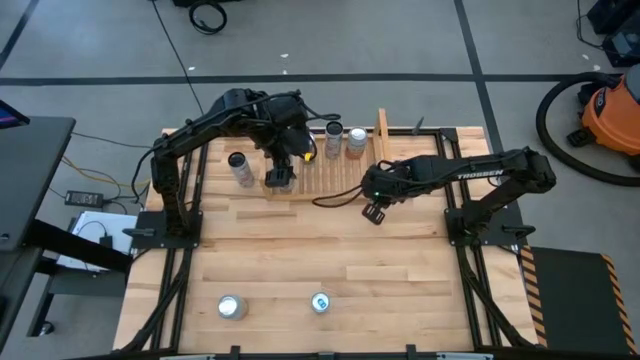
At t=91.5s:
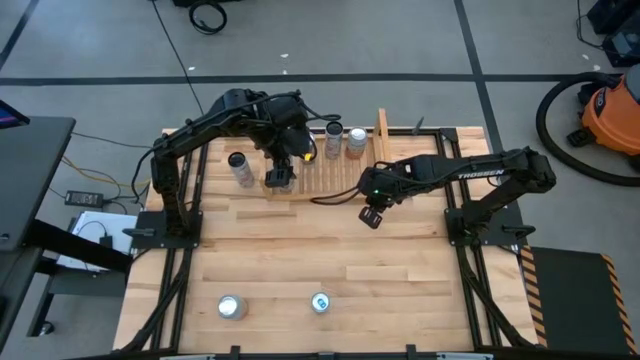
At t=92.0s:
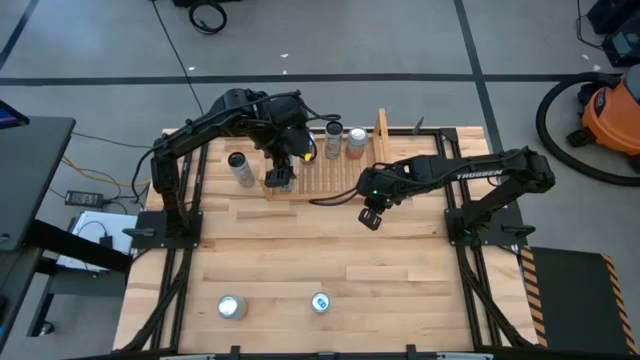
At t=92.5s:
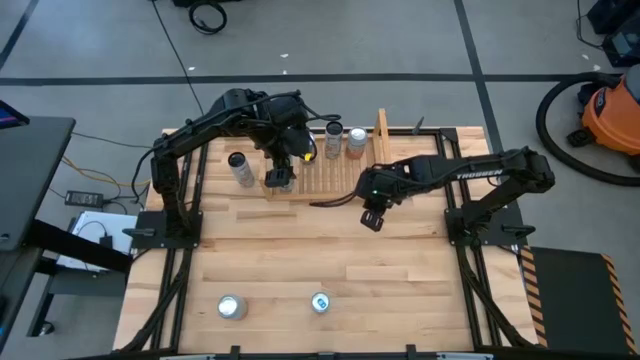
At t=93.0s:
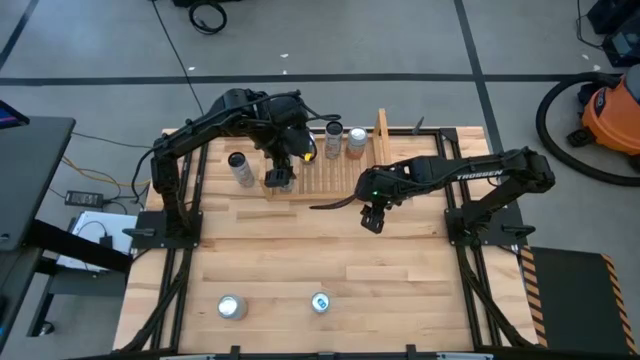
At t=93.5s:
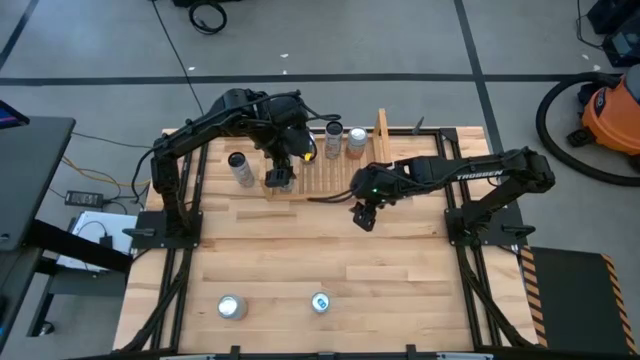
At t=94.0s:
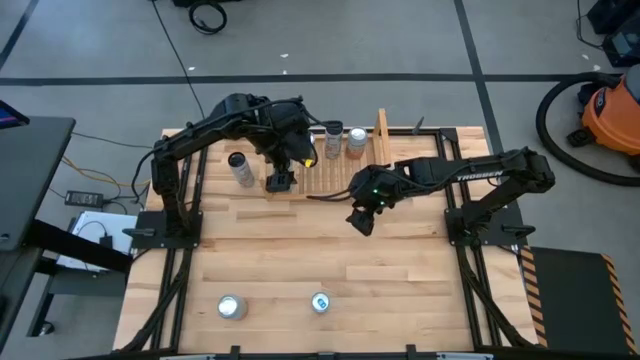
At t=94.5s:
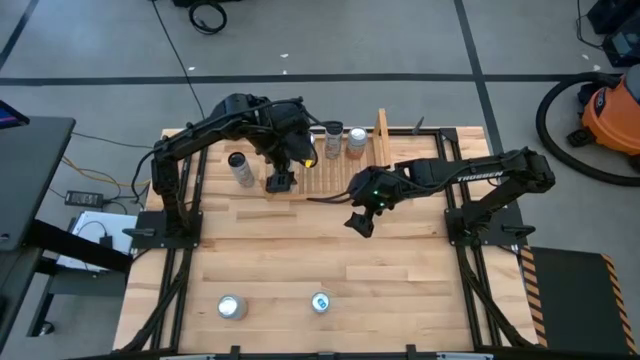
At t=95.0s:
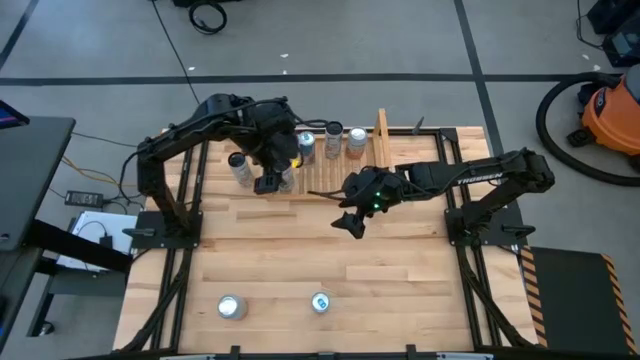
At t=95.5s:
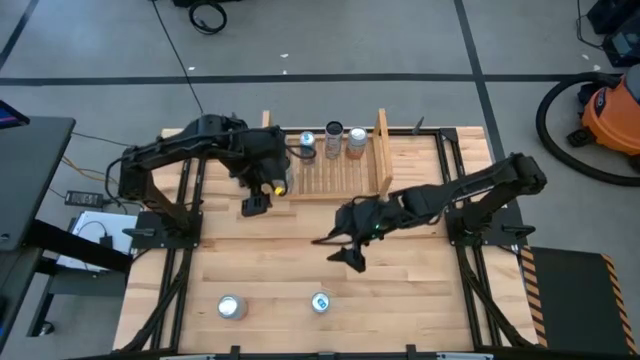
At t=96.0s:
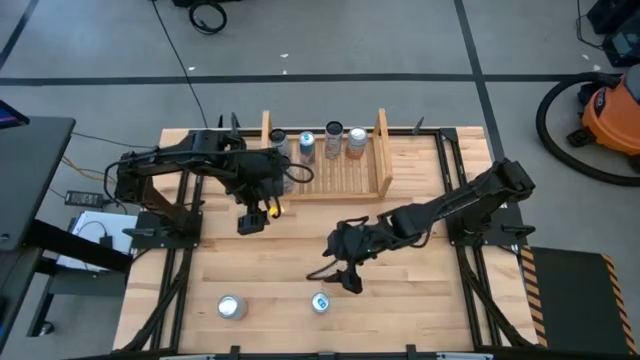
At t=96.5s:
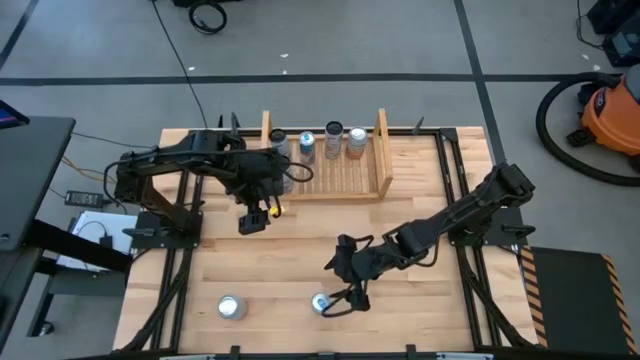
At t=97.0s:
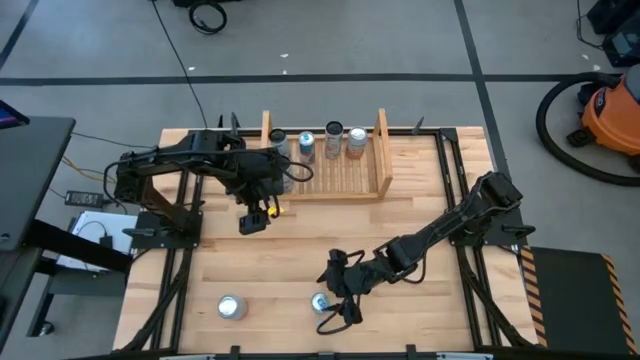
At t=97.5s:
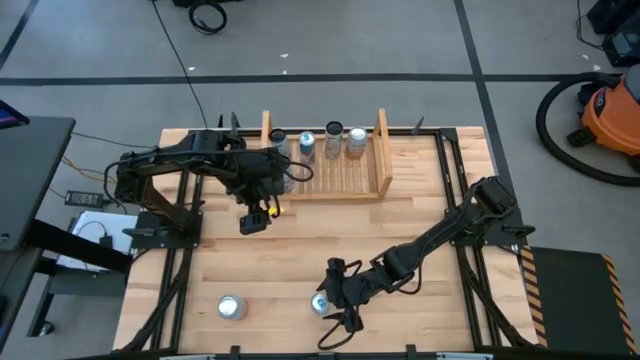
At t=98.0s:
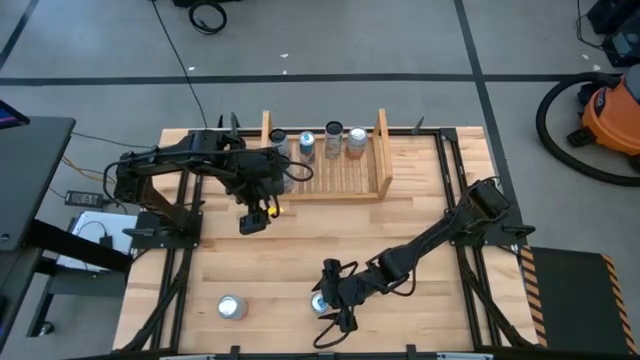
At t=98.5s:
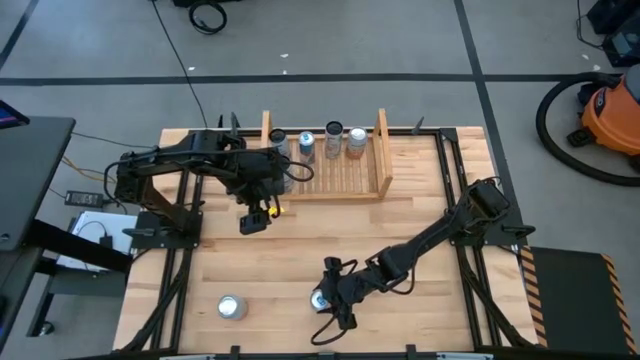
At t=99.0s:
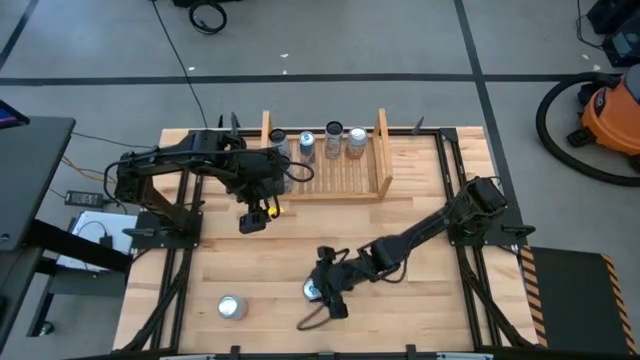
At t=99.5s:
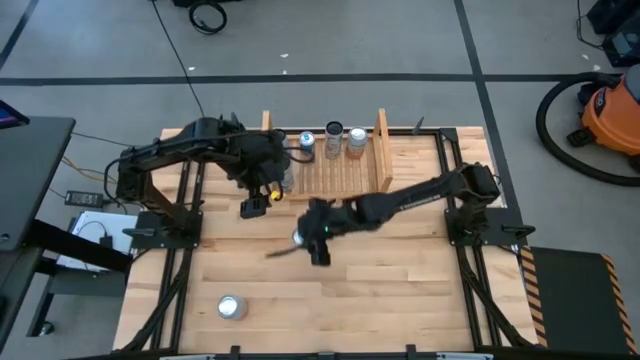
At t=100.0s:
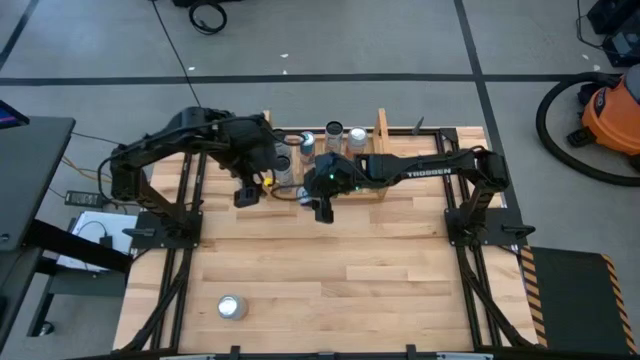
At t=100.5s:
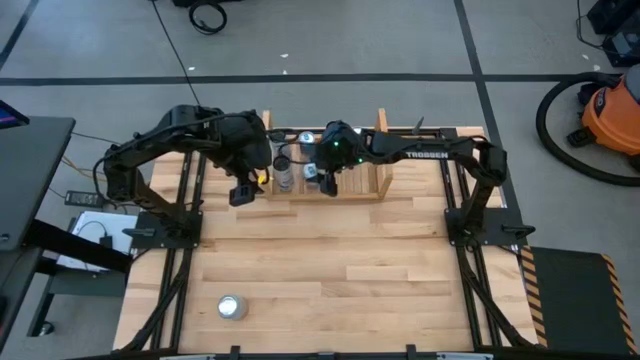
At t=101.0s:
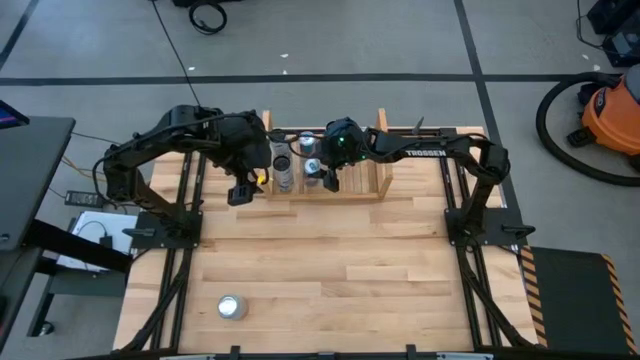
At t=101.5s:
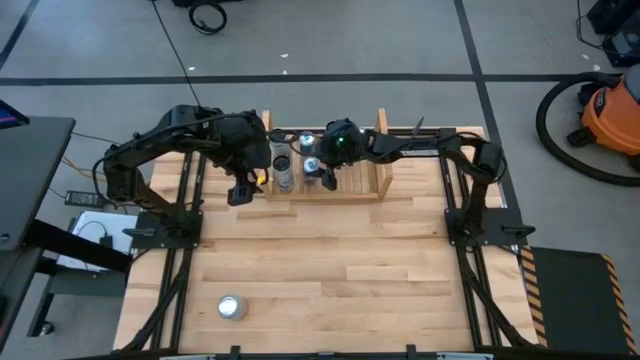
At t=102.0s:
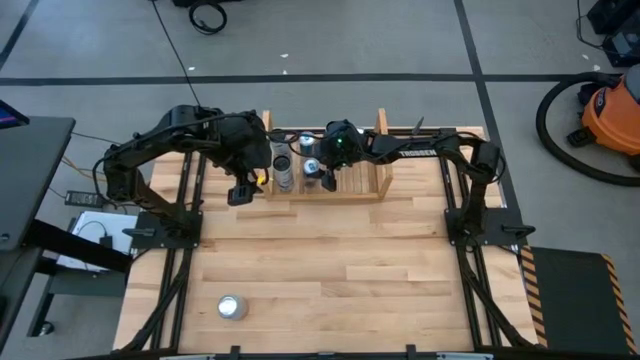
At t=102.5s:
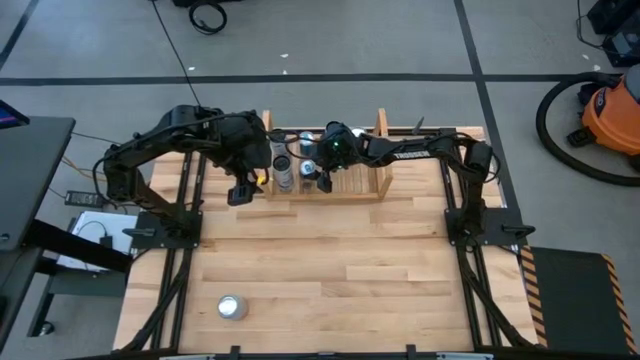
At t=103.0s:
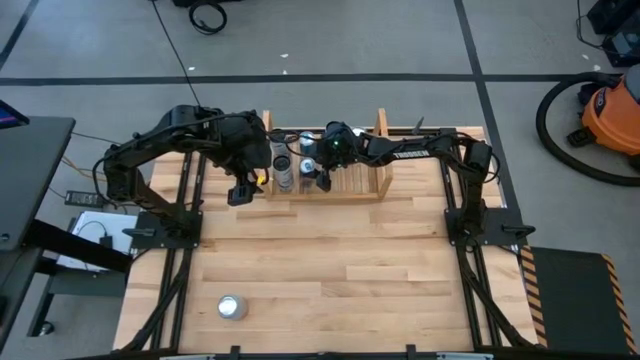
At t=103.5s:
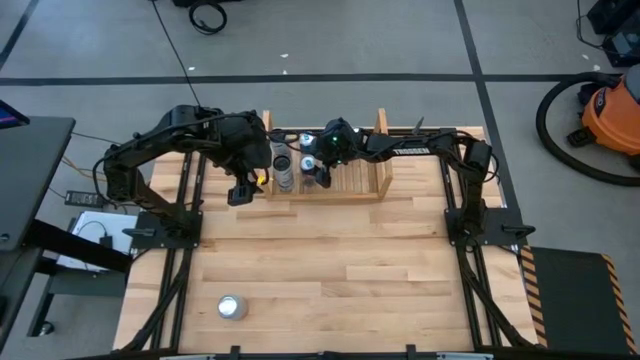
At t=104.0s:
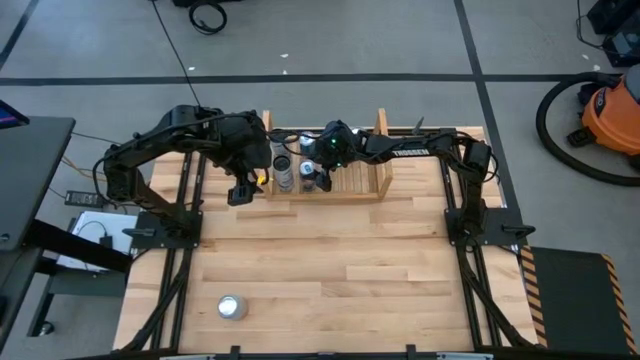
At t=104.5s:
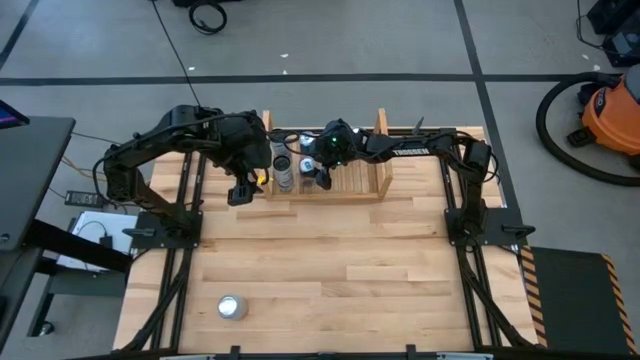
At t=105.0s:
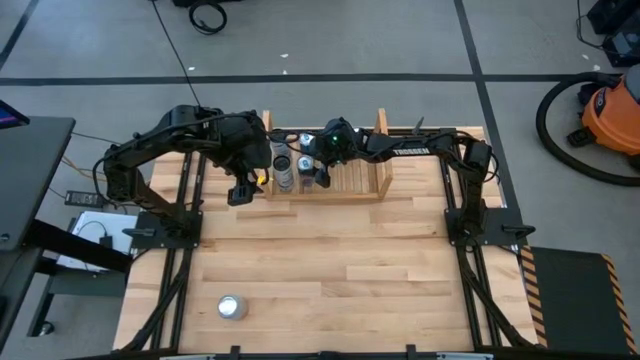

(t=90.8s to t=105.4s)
Task: Place canned beverage on shelf
Put the blue soda can on the shelf aligned with the other blue soda can

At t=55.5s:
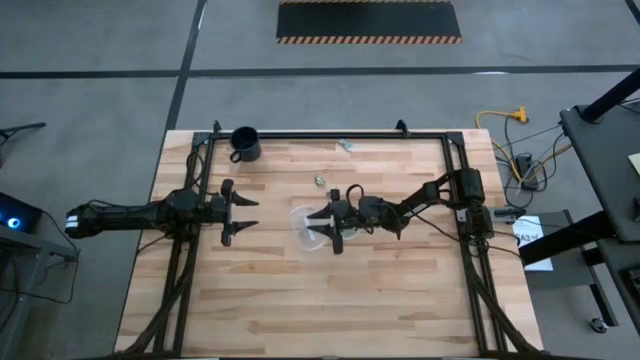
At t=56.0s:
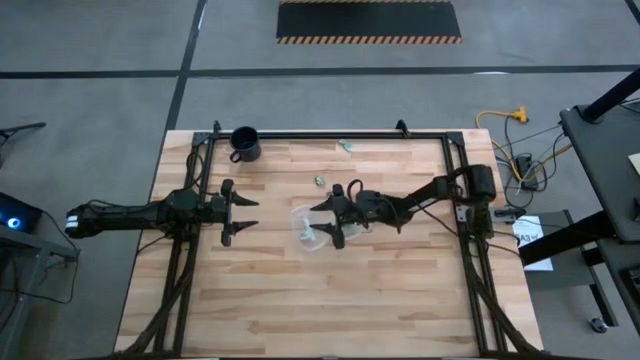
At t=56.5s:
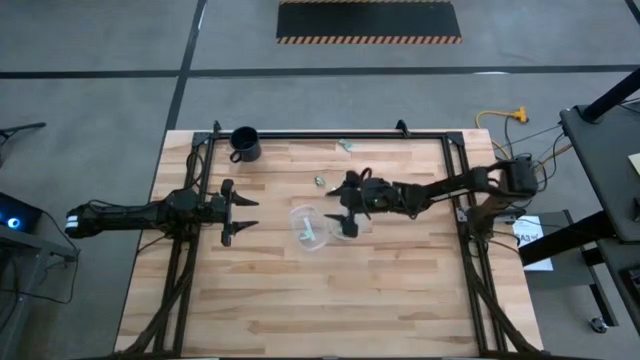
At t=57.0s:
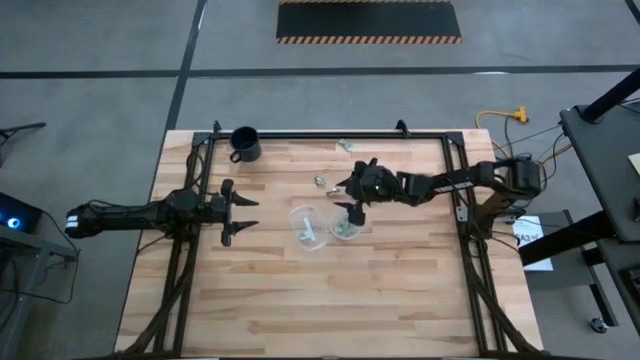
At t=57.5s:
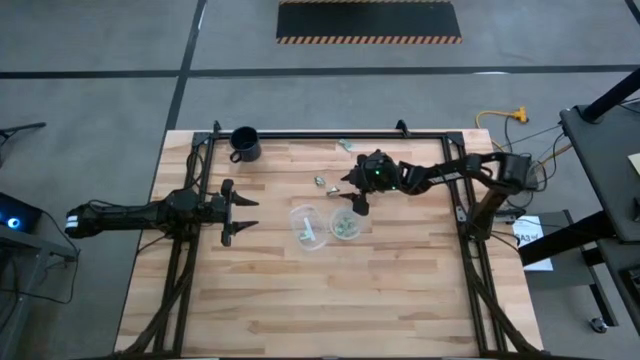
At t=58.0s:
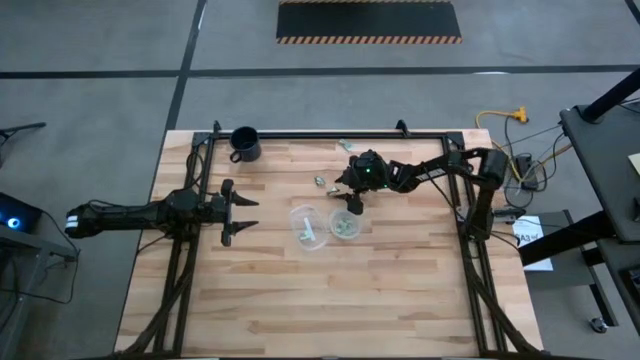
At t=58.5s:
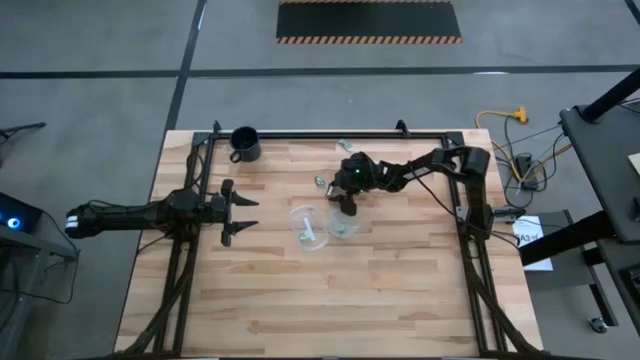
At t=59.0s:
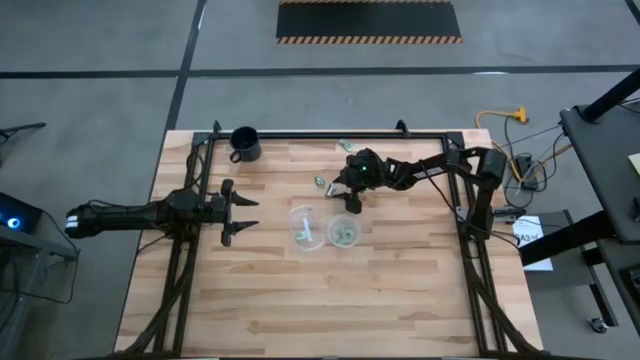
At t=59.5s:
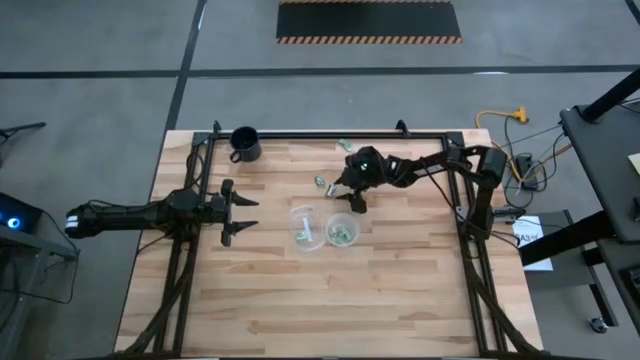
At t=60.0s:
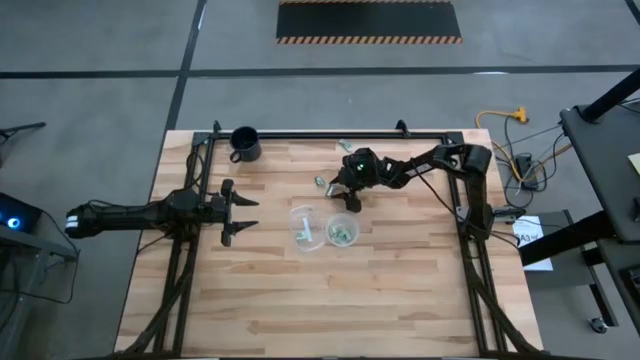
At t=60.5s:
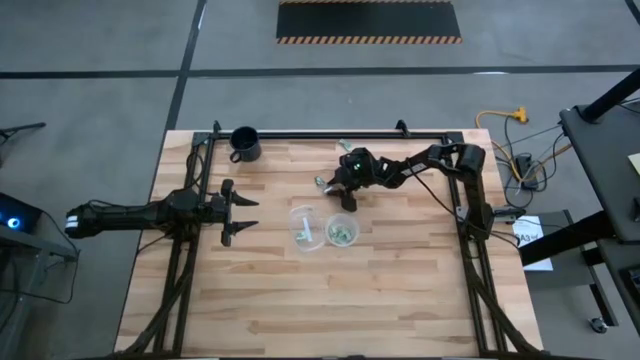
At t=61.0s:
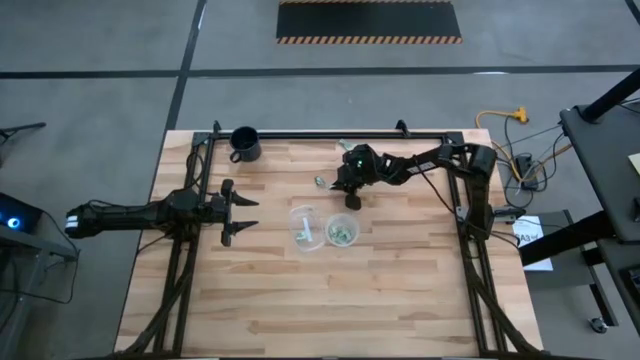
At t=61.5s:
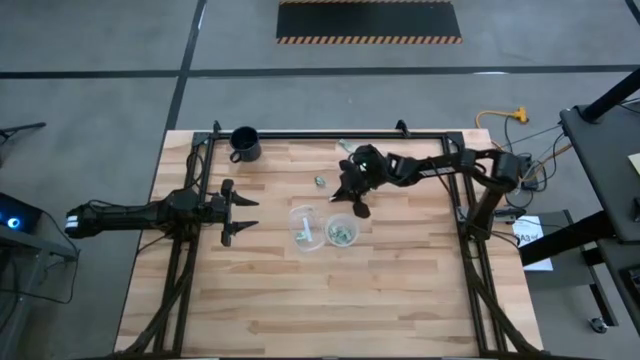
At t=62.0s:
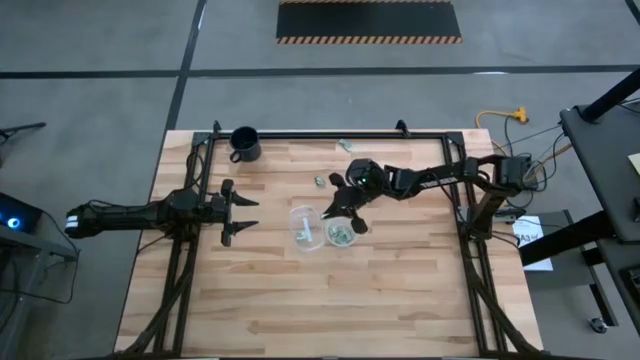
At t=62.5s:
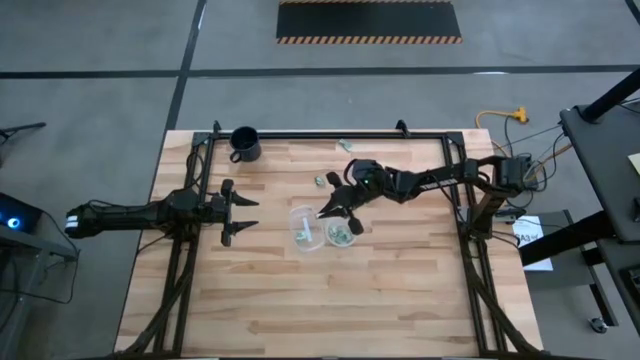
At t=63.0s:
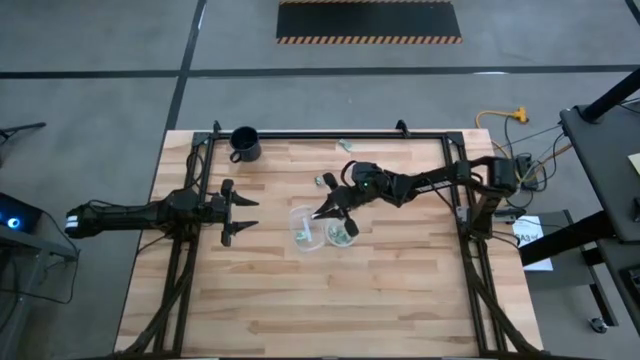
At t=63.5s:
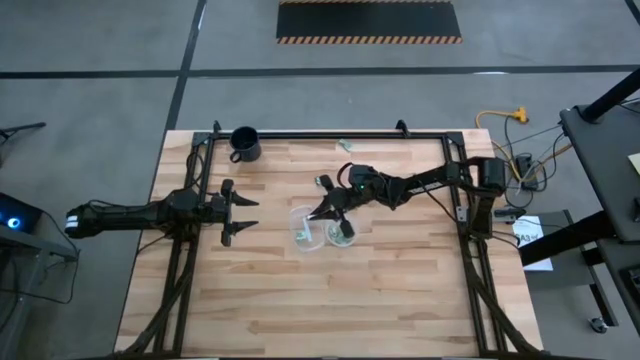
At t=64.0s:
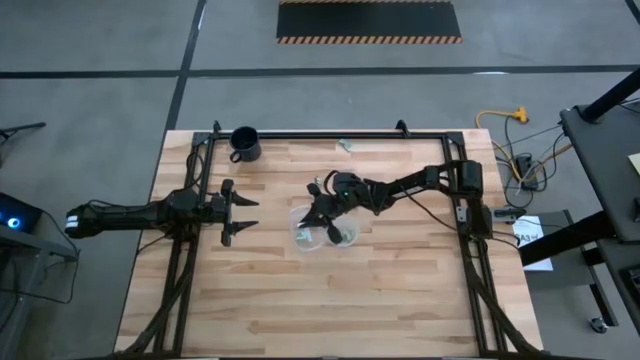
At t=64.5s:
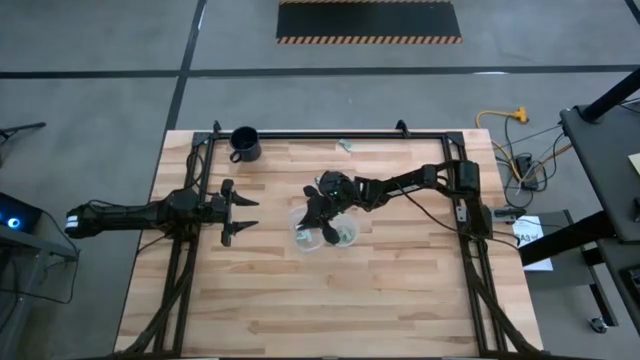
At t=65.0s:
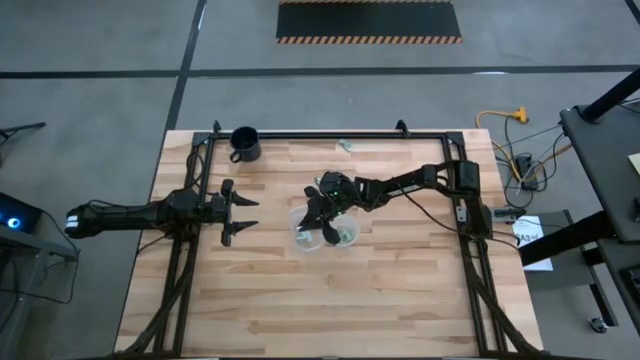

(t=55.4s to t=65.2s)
Task: Pick and place Stevia / Truvia into bins
Put the green truvia packet into the left transparent container
